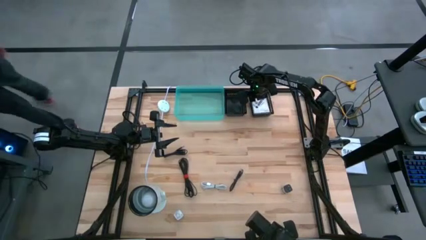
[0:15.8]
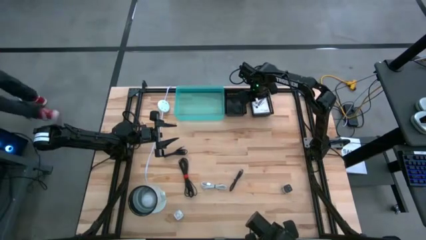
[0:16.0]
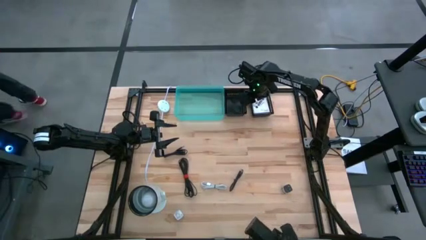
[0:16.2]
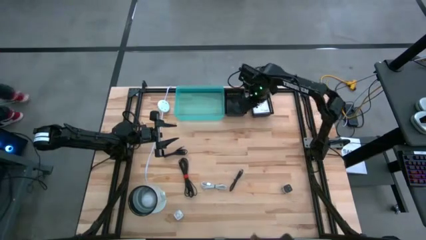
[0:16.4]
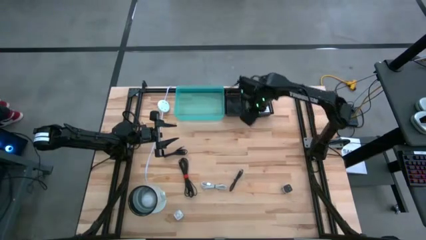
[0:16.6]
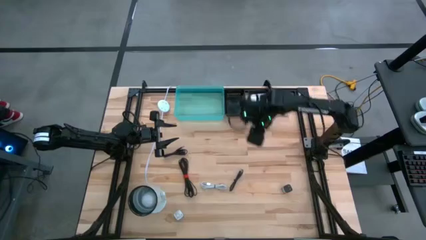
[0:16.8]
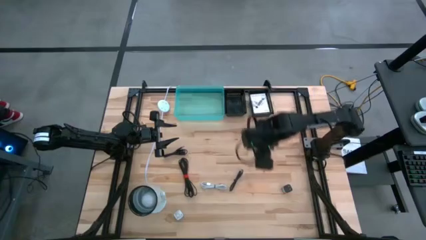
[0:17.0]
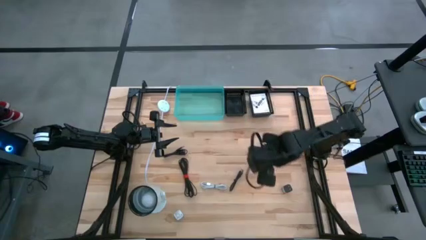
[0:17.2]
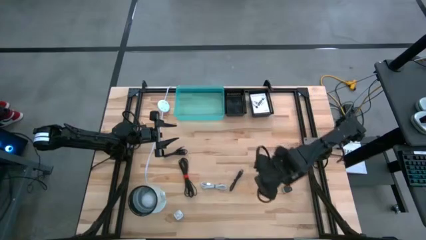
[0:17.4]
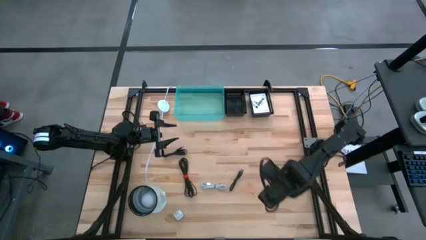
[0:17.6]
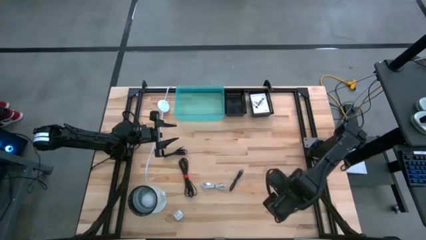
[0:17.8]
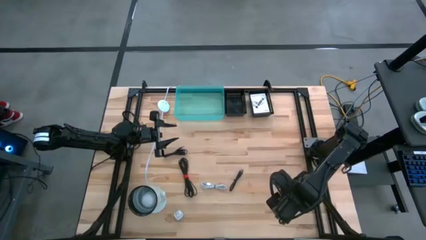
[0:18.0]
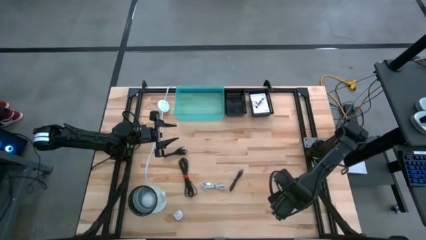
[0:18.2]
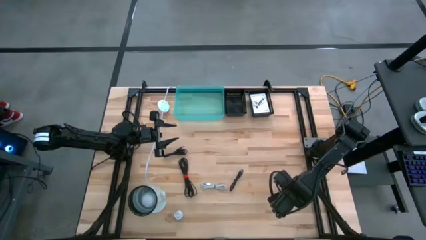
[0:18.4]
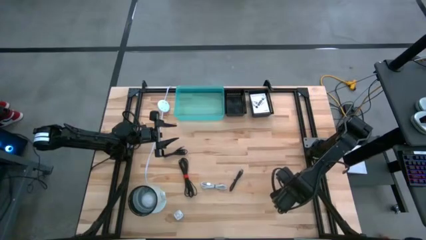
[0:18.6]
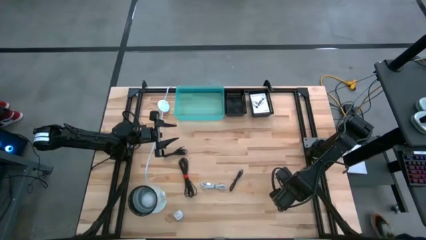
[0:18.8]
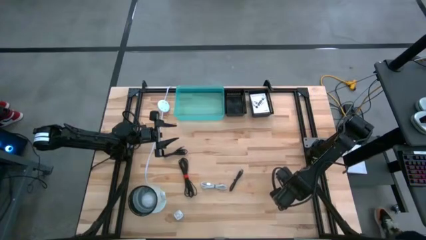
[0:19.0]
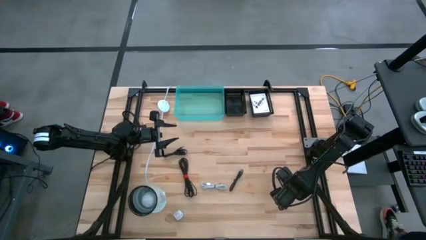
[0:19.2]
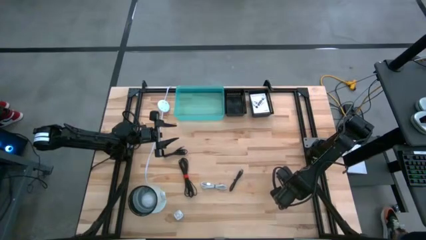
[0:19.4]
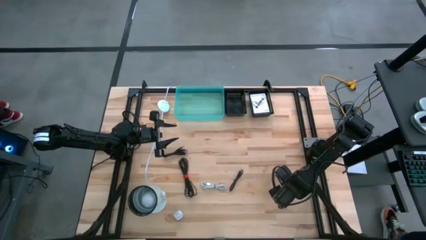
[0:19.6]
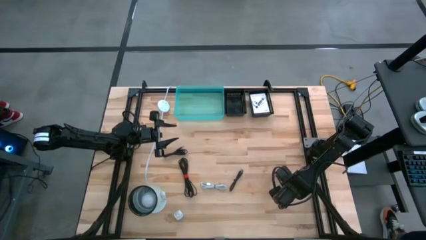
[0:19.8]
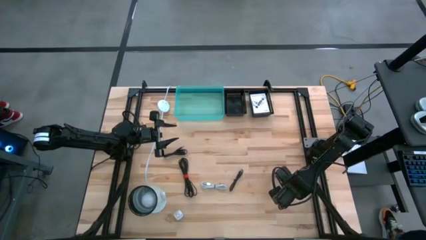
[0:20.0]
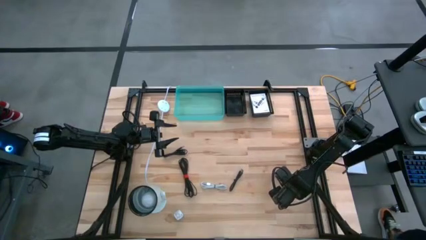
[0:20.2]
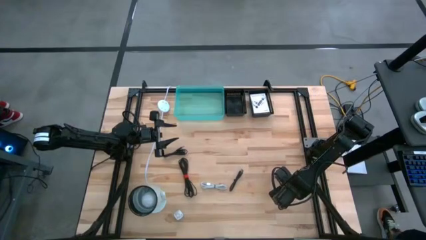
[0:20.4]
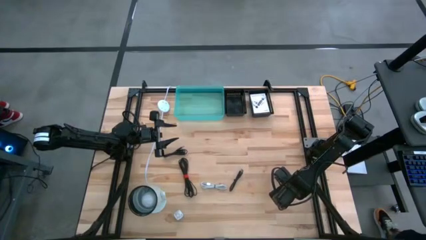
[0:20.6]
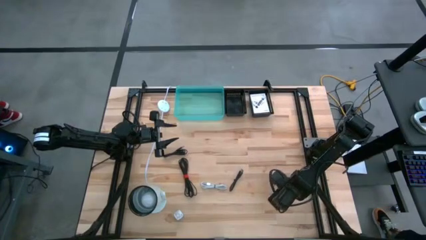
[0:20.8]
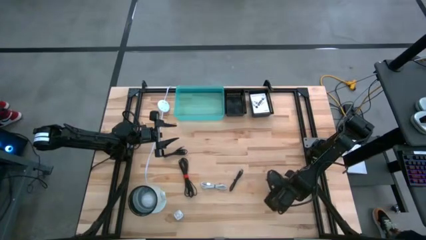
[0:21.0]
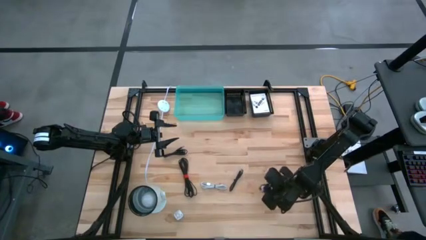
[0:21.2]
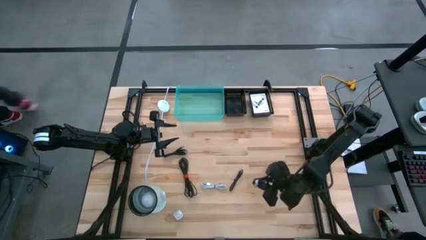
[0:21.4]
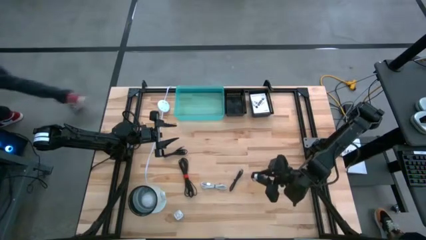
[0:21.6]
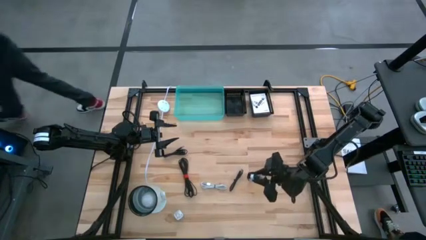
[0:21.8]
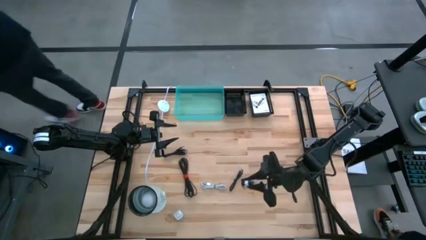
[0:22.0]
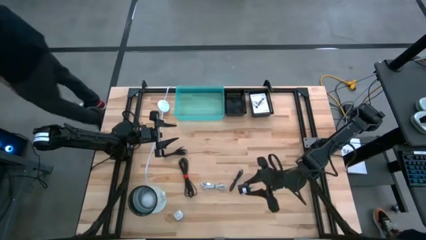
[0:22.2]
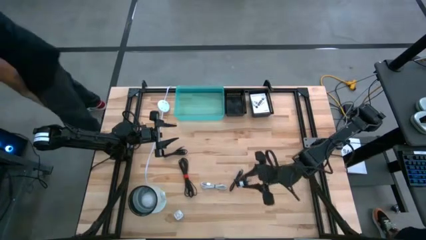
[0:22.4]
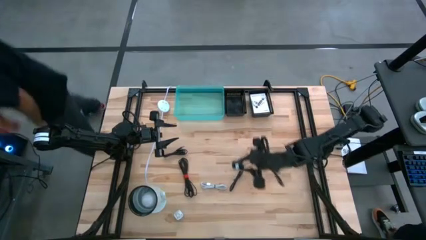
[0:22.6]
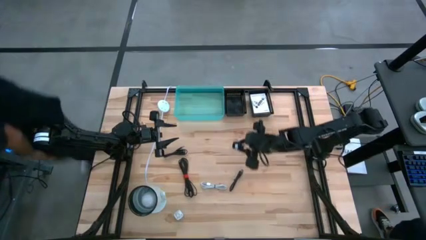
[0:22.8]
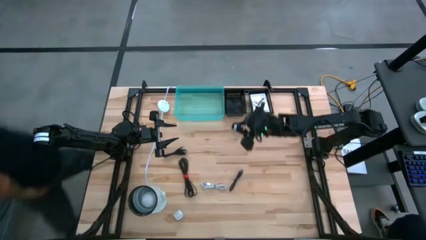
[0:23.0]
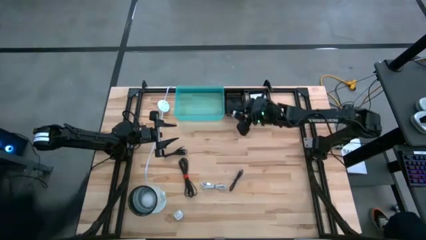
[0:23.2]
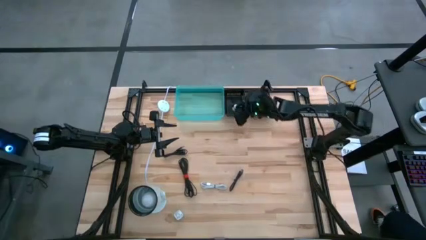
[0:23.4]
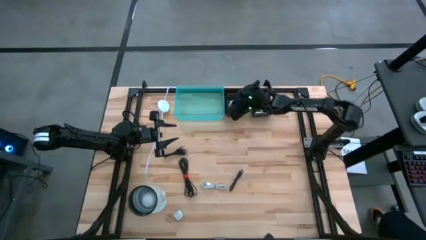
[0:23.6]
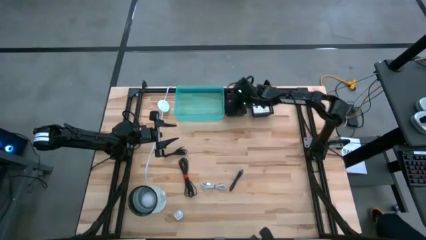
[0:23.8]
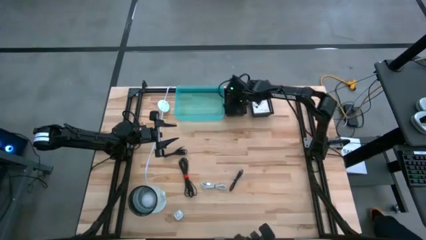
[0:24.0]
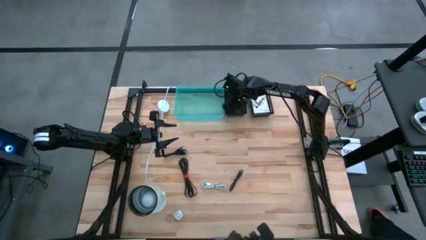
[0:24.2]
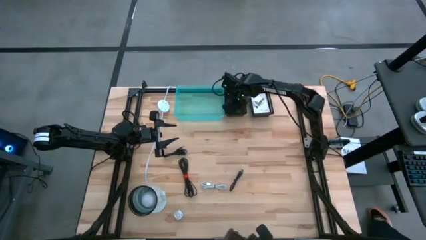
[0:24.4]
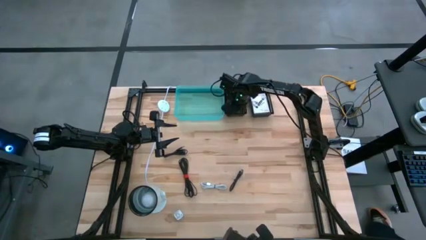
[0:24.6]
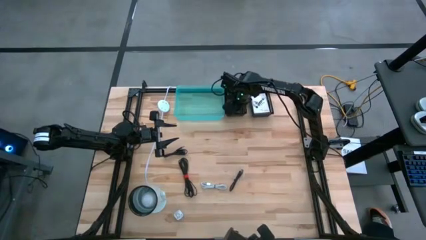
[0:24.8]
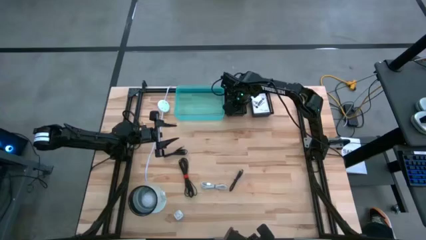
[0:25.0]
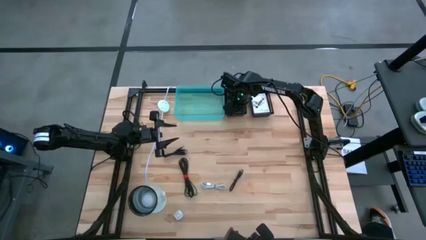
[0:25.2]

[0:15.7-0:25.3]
Task: Pick and place items into bin
Put the black charger adapter into the left black bin

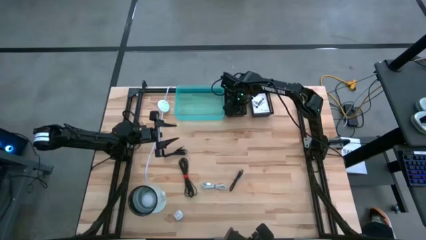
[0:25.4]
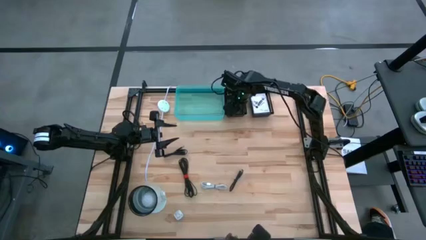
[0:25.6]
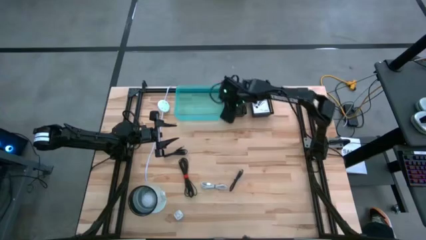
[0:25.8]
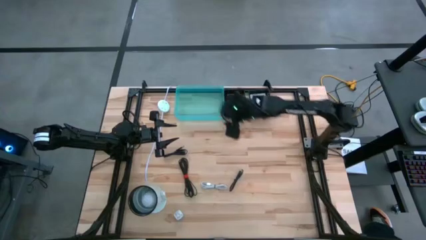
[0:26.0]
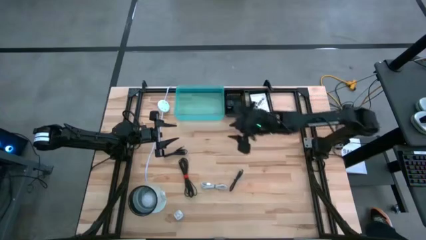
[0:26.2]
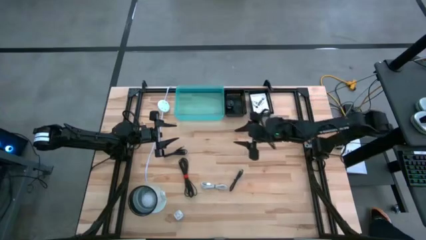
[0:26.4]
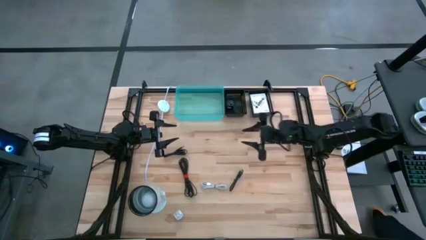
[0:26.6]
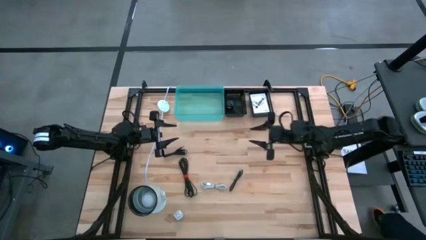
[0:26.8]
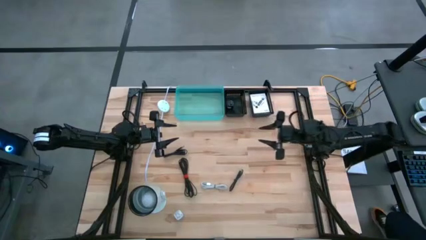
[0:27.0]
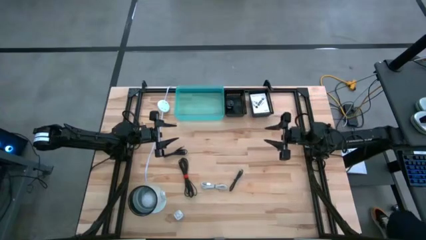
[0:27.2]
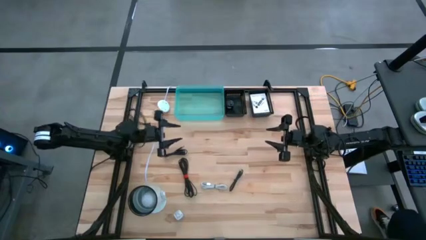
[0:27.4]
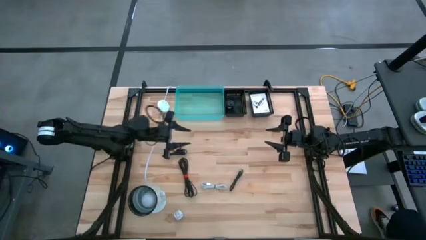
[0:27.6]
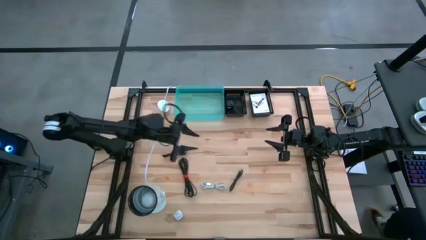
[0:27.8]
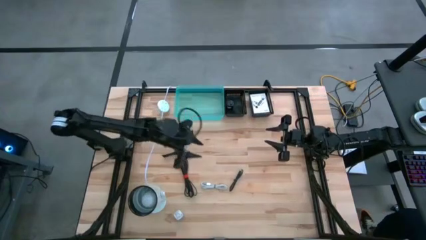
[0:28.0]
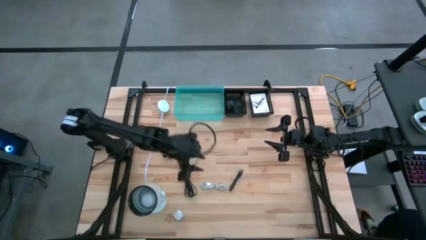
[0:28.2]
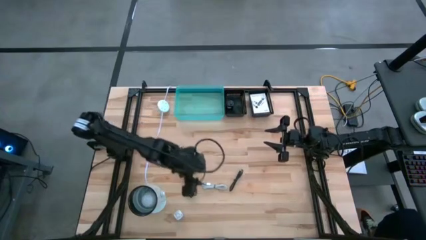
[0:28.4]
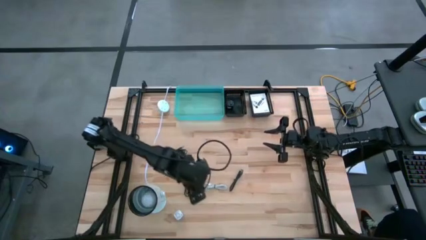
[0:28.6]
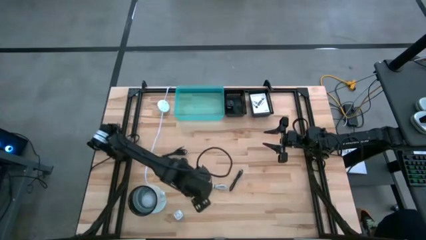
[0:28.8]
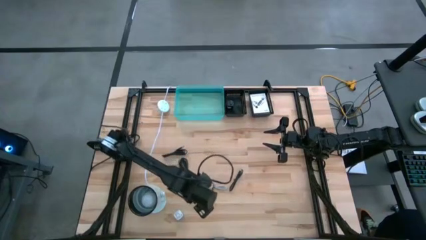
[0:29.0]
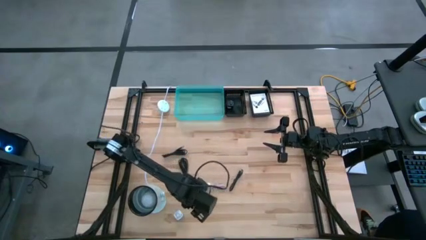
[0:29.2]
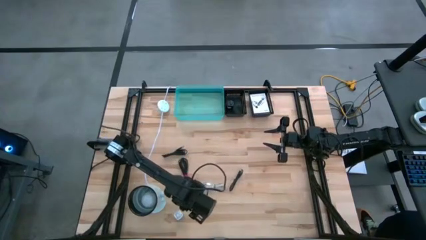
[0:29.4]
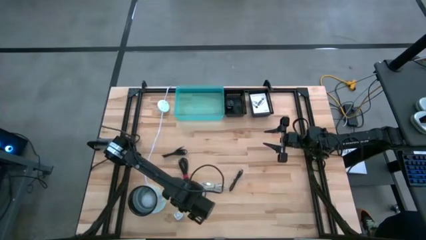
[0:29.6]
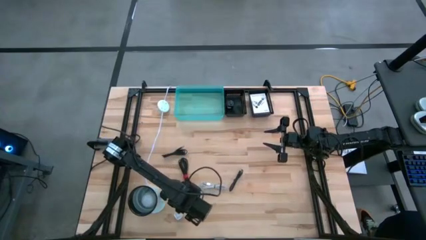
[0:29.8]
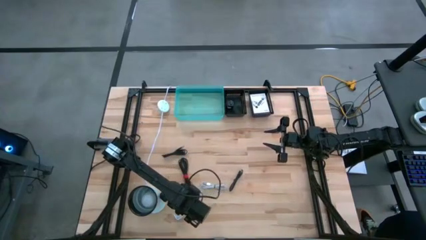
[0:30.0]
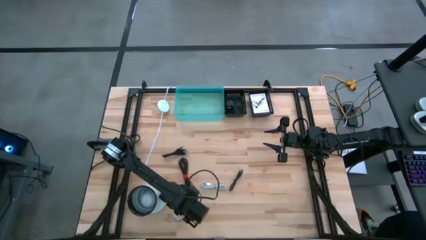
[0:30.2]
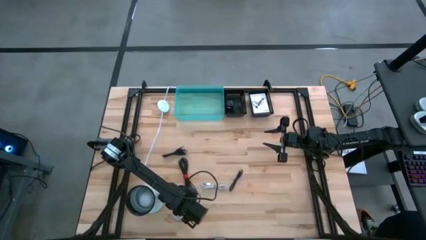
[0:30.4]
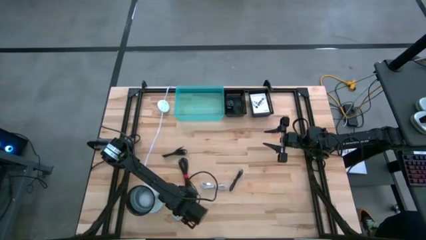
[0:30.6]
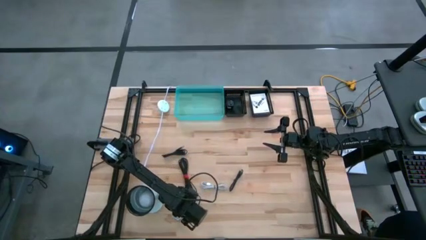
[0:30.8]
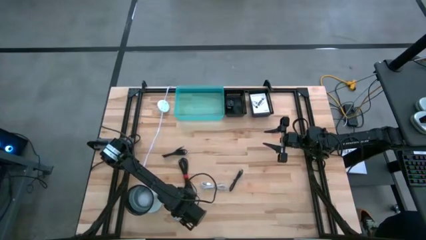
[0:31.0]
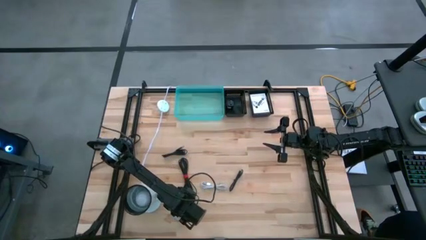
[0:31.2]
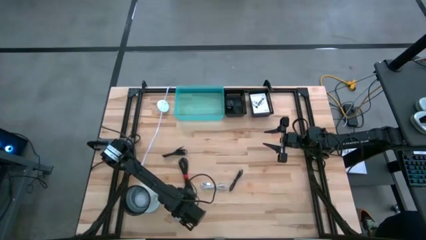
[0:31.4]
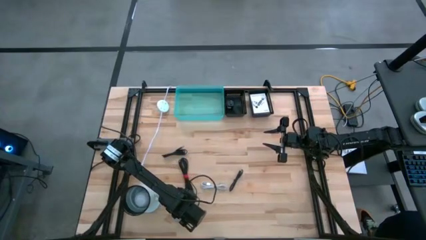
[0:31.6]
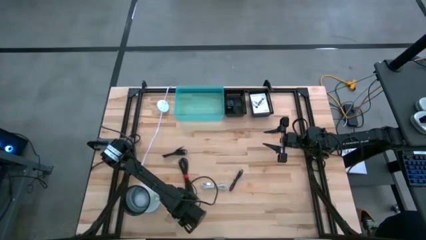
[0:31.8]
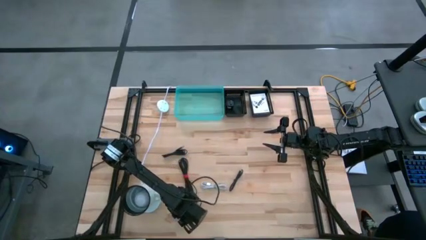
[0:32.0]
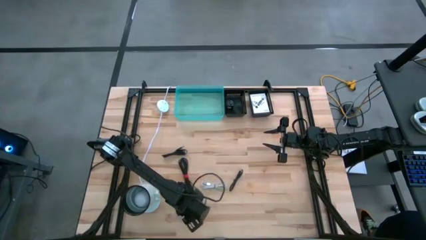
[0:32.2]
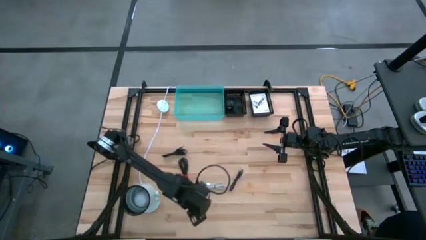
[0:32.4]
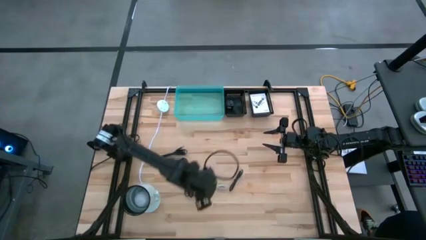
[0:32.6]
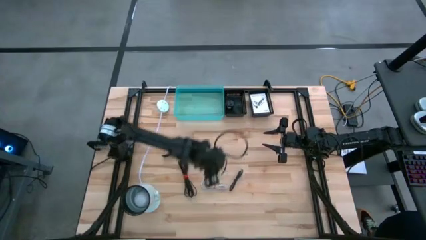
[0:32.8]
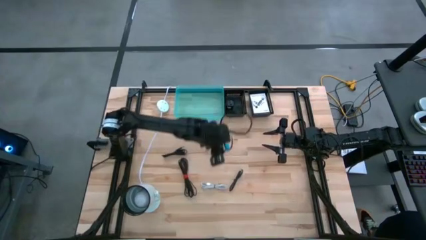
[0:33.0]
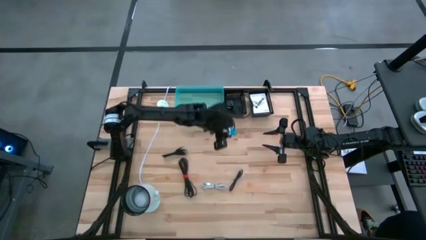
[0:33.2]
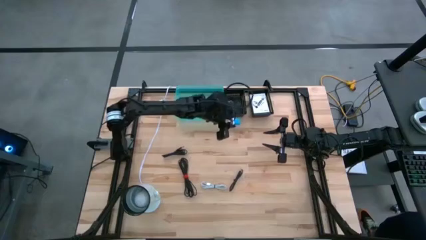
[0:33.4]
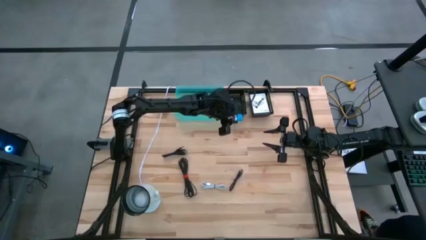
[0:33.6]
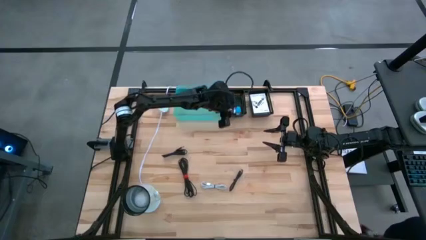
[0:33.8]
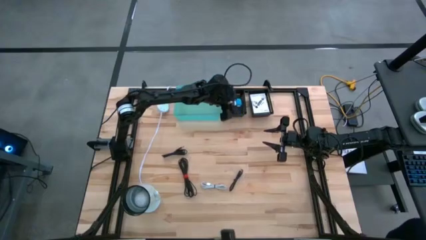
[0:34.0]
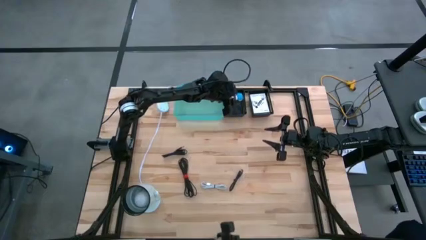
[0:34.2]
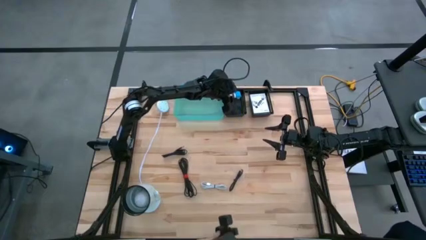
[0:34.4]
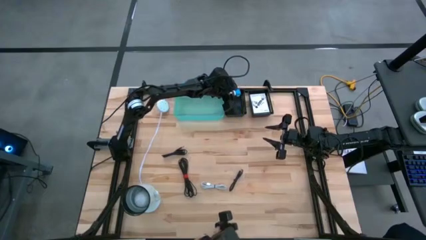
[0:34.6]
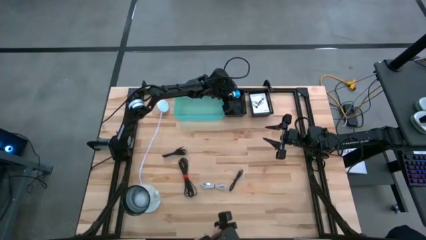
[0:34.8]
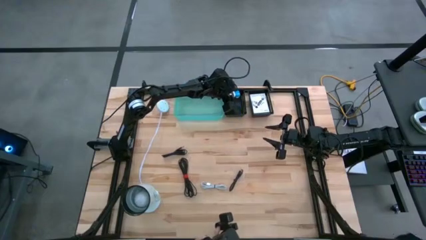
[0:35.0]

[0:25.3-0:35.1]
Put the blue charger adapter into the left black bin
